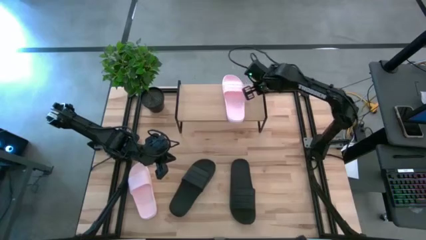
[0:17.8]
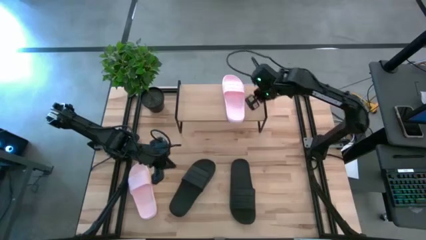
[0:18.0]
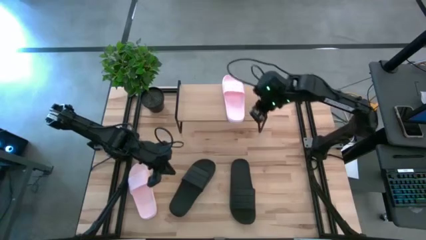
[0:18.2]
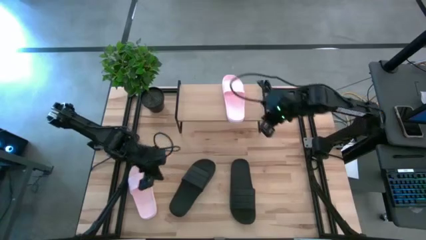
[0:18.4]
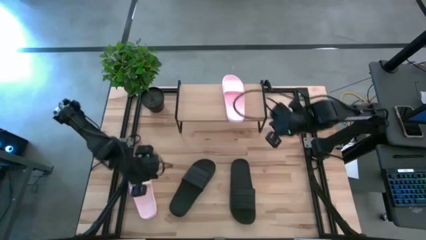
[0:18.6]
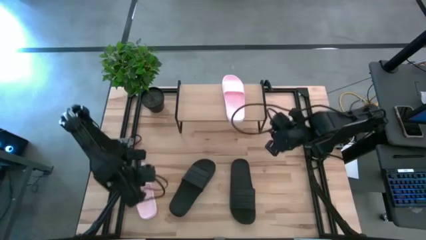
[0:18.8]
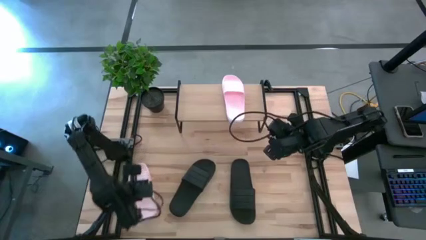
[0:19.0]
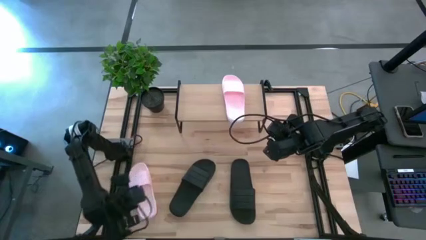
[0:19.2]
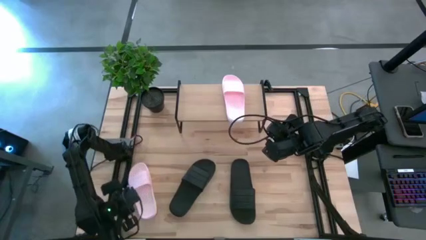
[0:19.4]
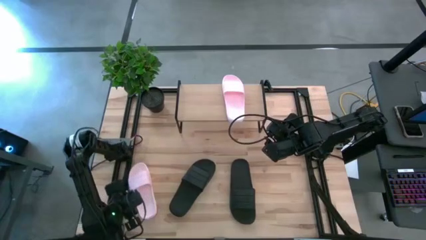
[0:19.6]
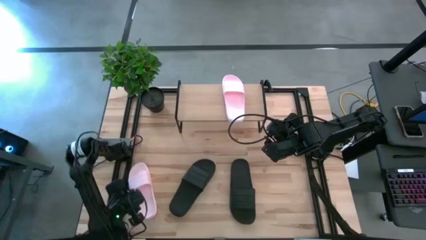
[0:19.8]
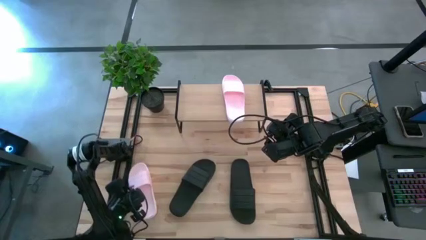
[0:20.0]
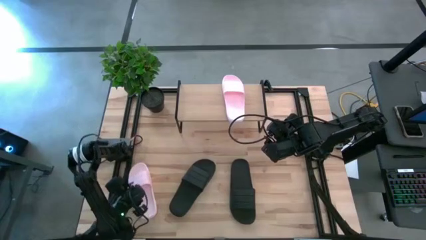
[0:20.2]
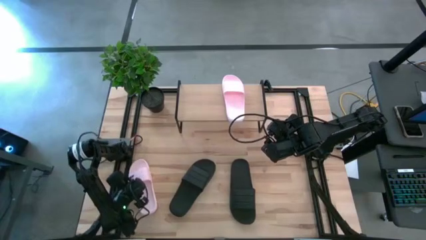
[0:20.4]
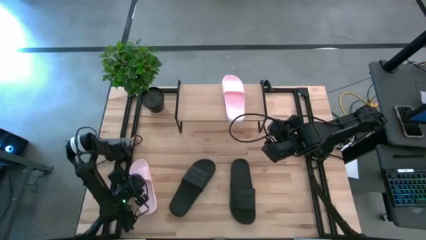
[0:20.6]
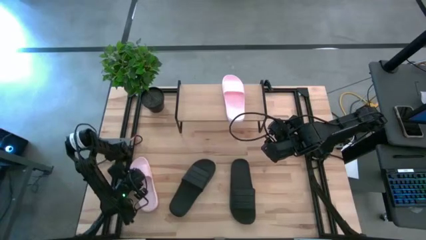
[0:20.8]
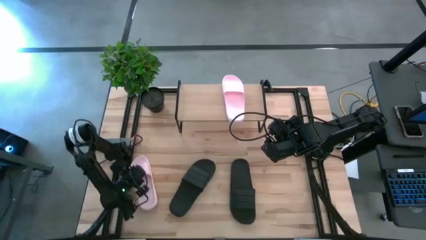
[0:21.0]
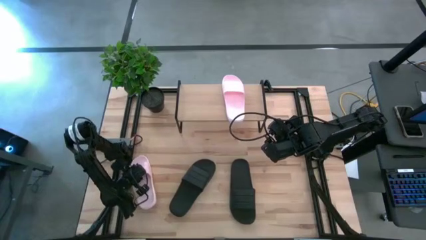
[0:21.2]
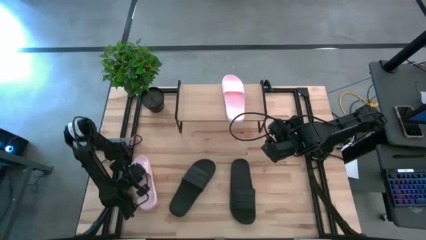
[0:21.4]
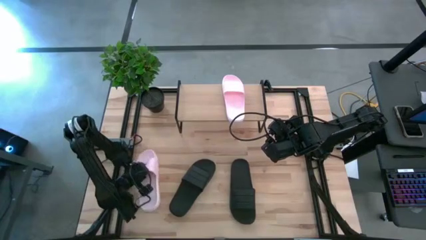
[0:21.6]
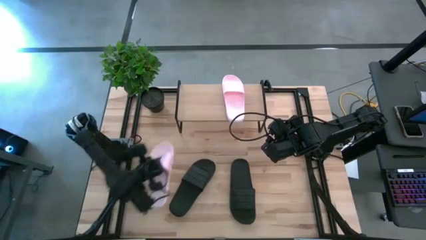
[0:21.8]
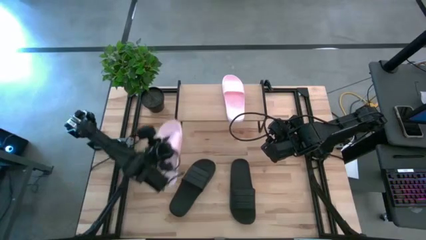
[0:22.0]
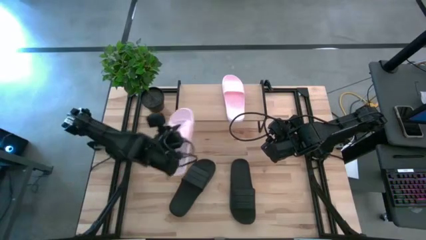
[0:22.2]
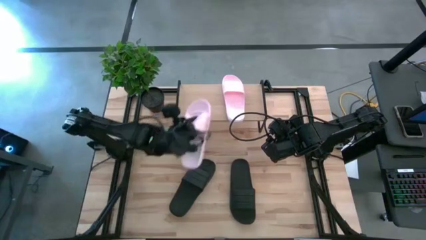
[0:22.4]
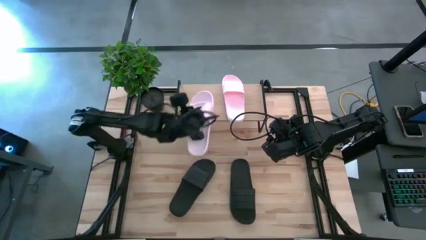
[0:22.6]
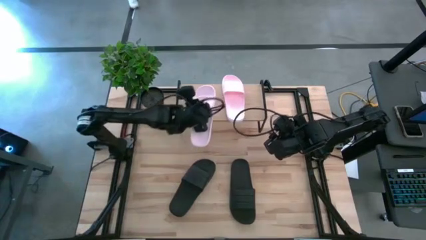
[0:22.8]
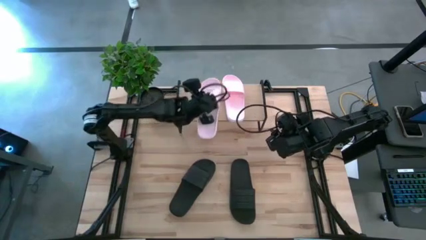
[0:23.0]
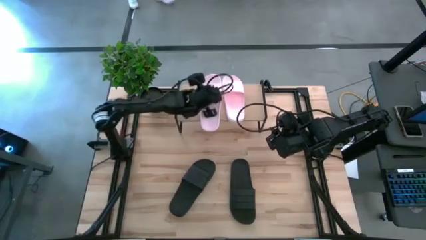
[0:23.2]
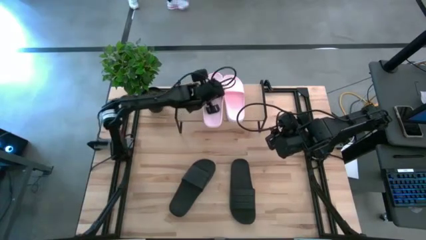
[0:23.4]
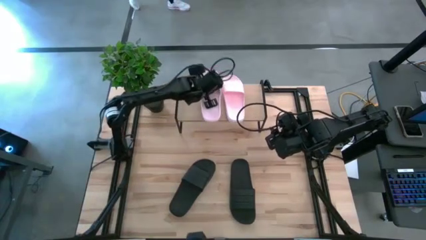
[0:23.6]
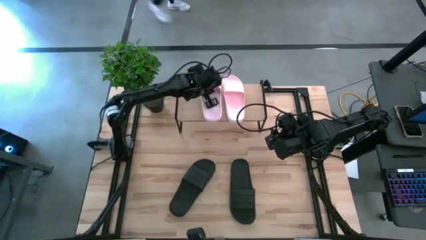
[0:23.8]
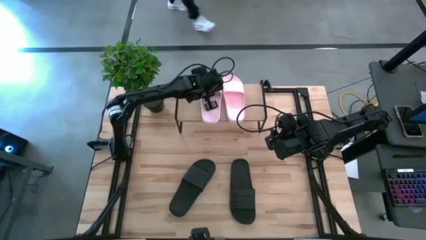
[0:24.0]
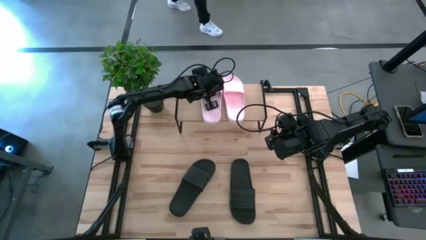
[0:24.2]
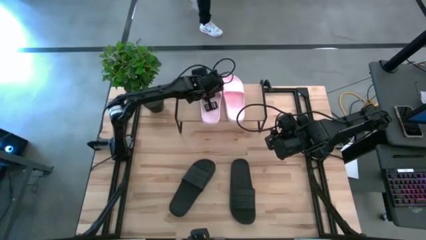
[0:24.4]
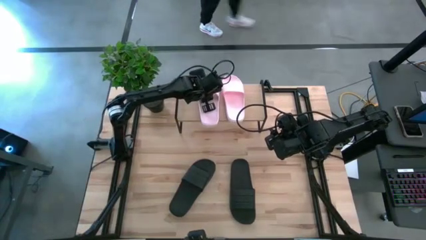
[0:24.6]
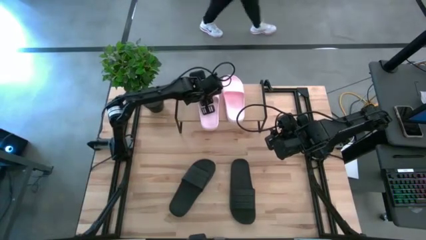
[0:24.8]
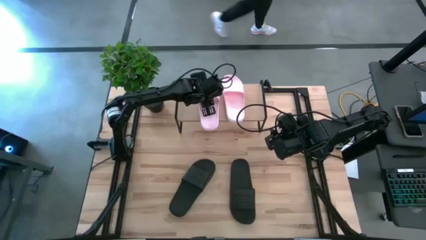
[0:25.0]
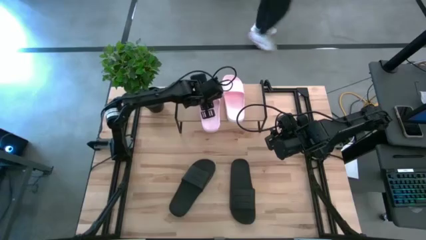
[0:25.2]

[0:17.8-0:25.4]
Task: Pick and place slides into the shelf
Put the pink slipper on the shelf

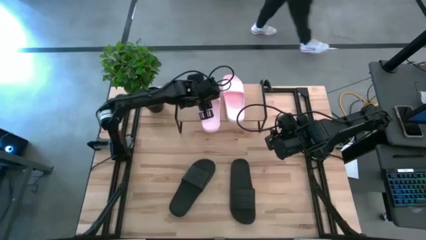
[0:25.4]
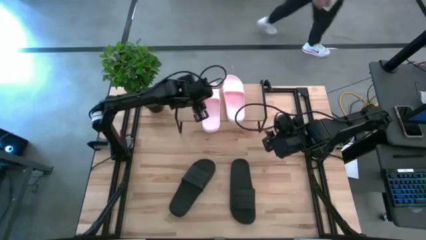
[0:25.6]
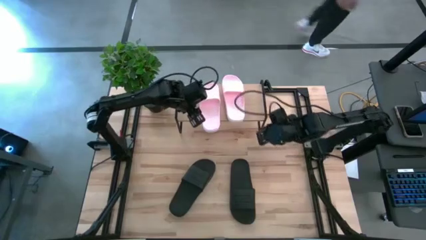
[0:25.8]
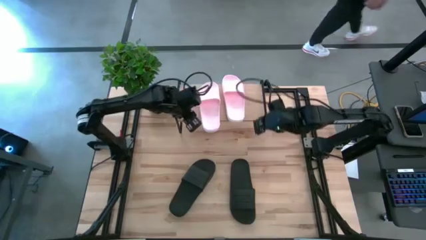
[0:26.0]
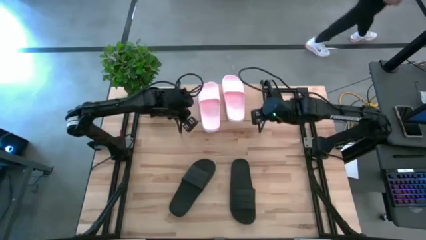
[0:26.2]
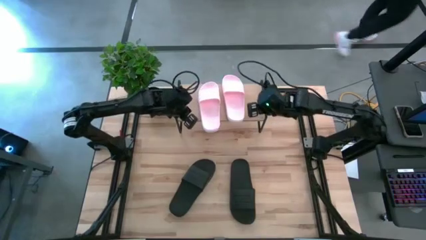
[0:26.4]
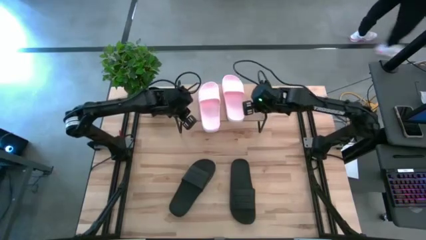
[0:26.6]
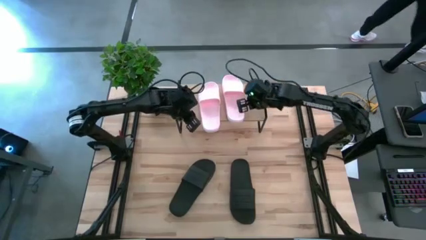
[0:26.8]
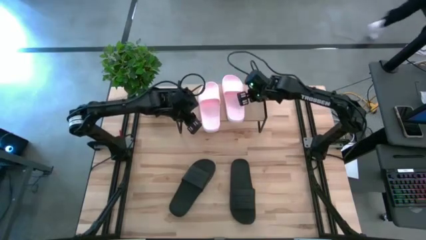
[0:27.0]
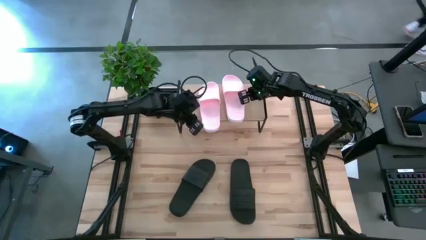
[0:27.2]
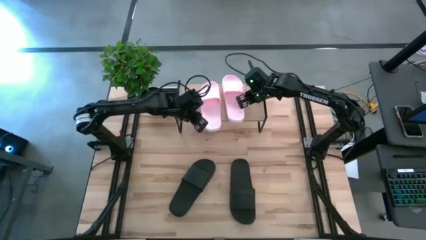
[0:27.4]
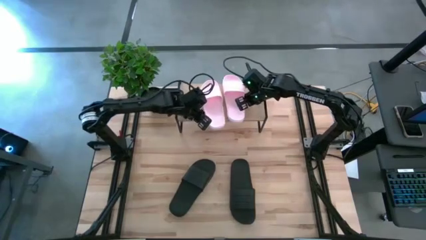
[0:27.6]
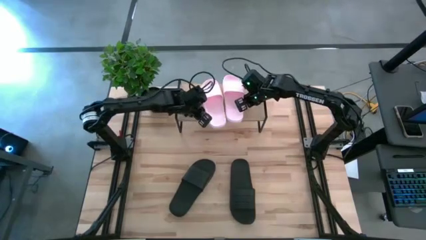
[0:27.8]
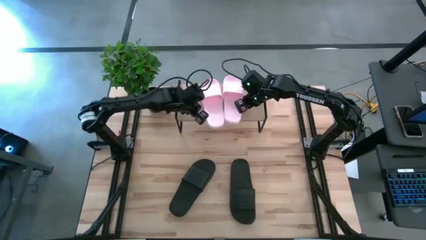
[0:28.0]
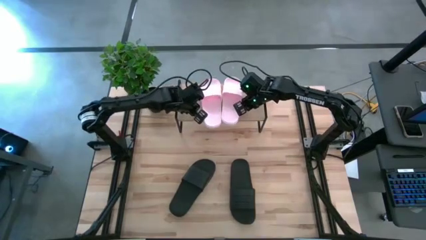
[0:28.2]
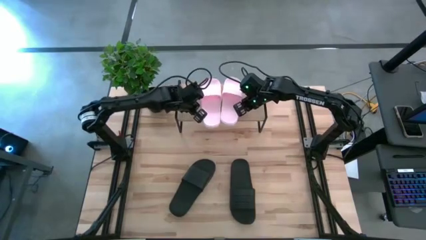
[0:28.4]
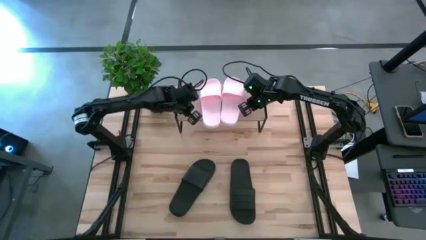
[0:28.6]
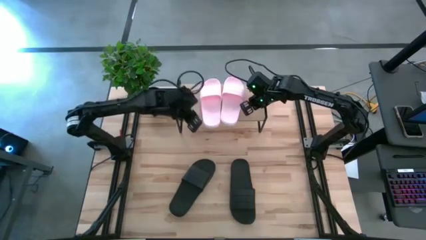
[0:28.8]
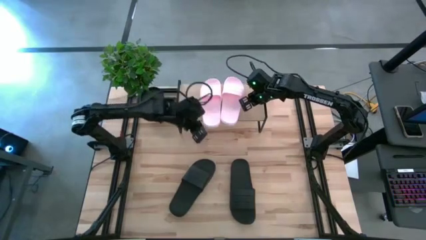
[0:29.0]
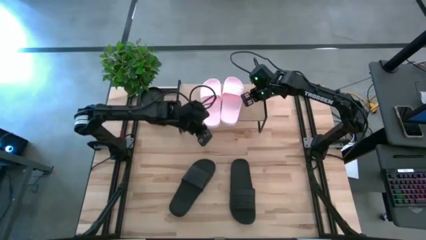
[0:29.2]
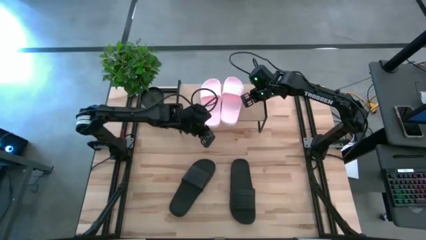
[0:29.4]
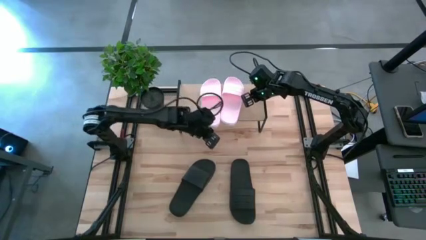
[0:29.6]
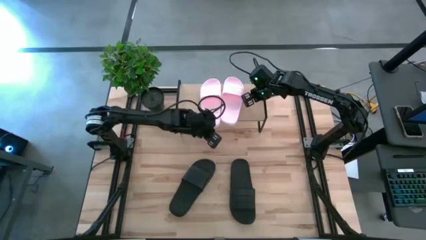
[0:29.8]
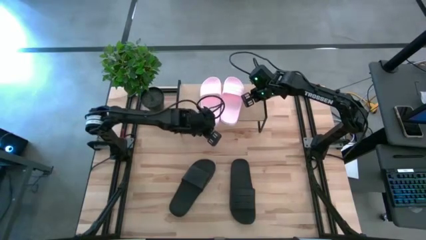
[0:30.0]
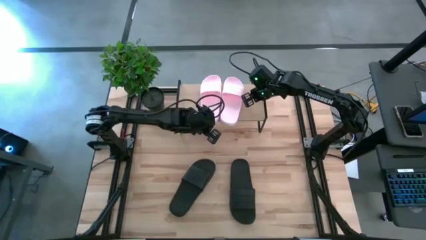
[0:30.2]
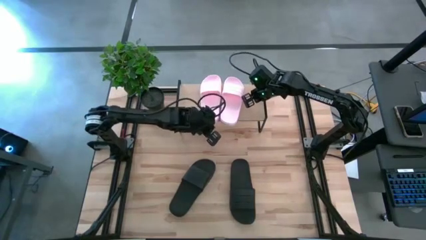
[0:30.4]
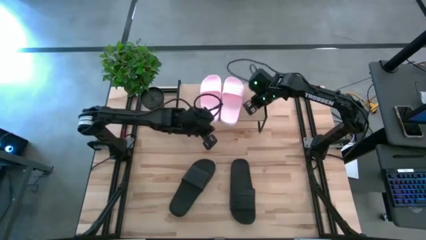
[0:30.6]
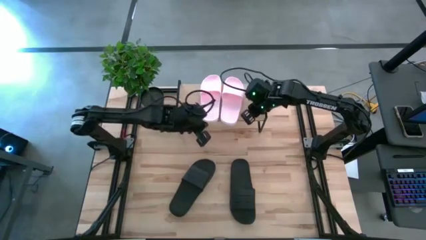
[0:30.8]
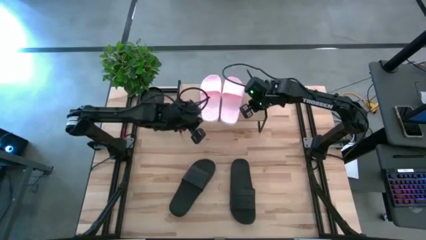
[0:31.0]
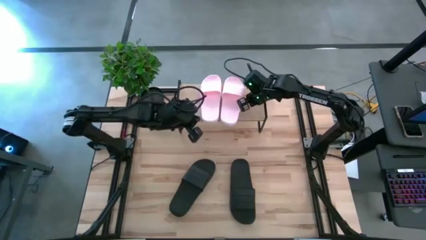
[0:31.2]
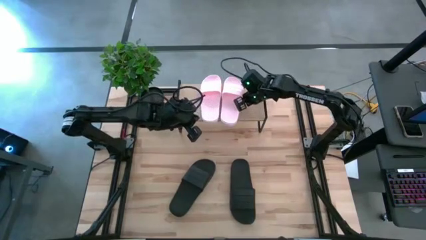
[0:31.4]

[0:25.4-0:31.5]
Adjust the pink slippers on the shelf
